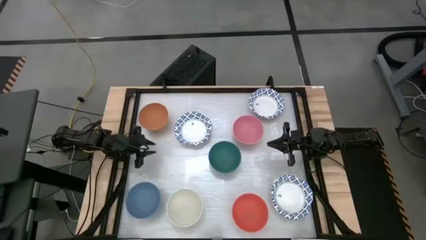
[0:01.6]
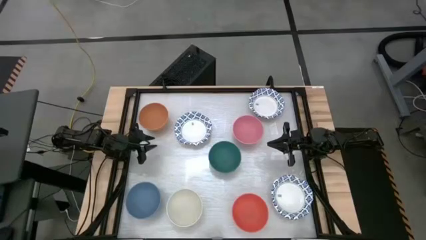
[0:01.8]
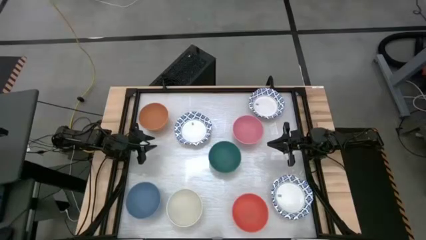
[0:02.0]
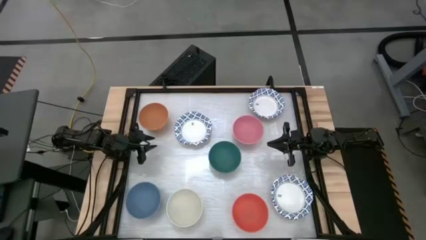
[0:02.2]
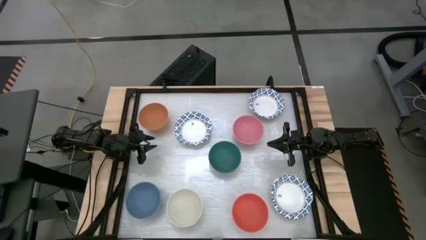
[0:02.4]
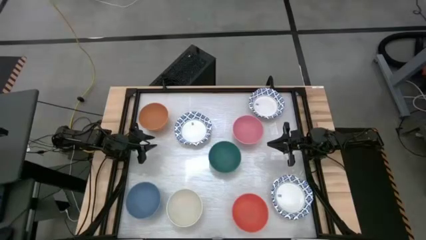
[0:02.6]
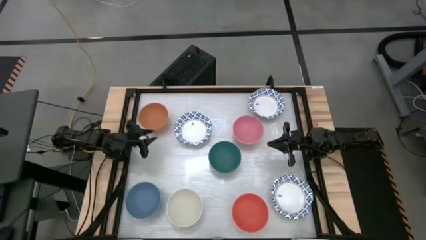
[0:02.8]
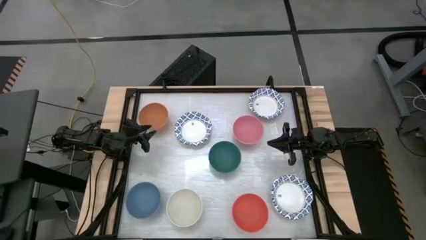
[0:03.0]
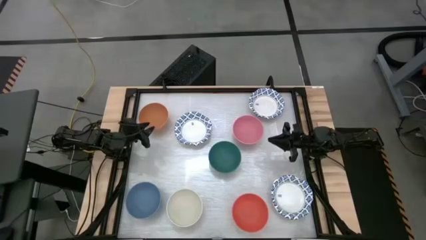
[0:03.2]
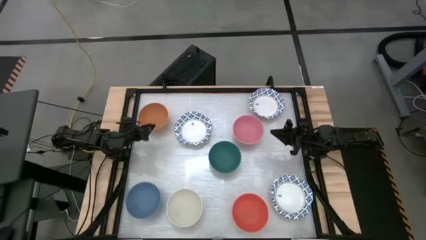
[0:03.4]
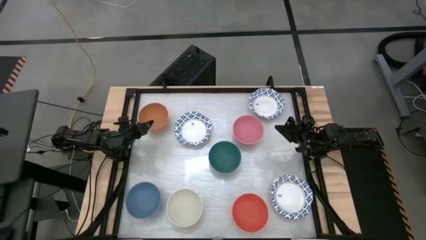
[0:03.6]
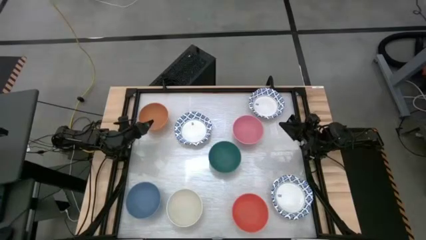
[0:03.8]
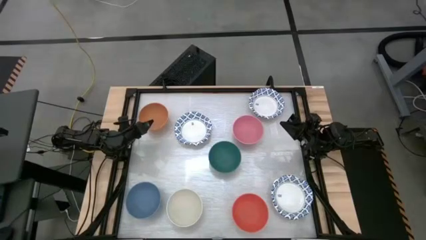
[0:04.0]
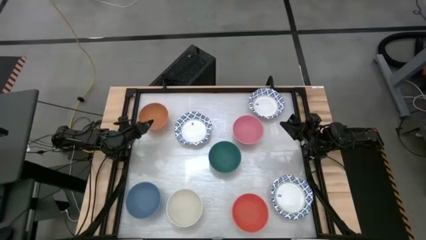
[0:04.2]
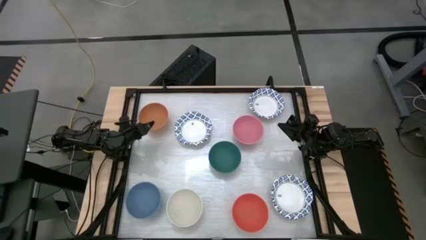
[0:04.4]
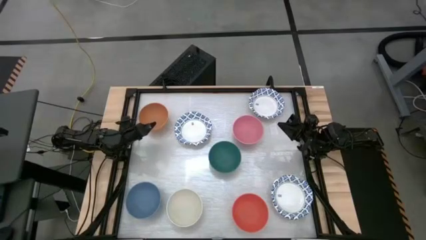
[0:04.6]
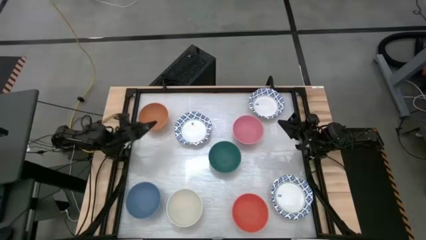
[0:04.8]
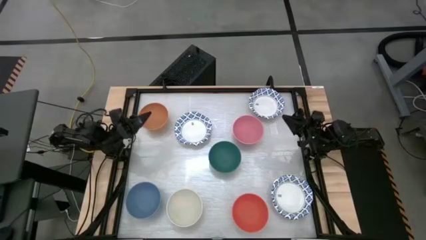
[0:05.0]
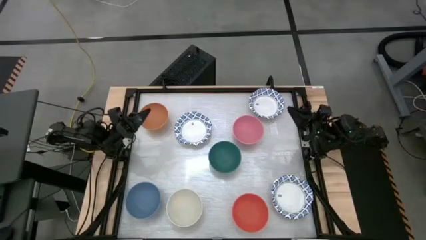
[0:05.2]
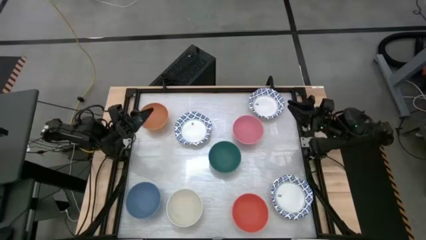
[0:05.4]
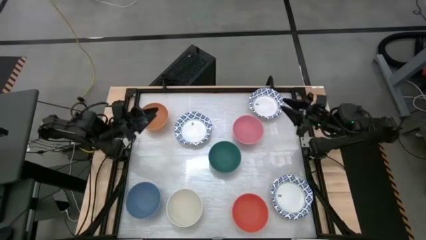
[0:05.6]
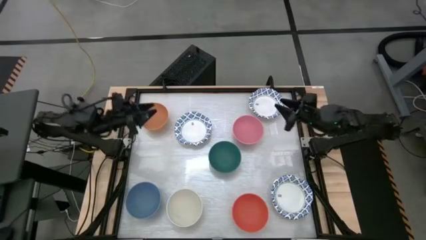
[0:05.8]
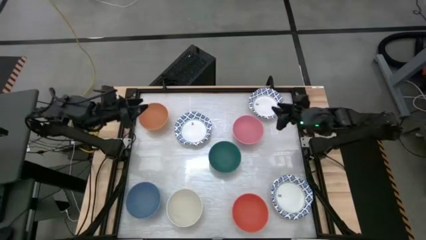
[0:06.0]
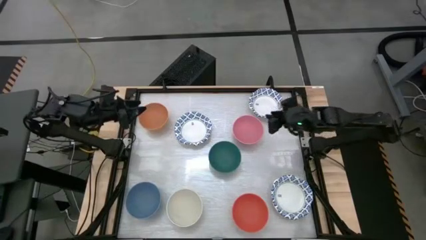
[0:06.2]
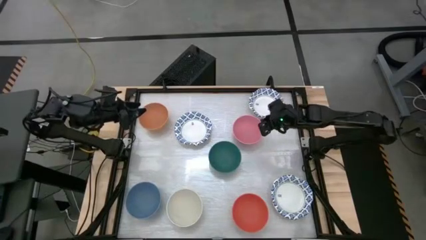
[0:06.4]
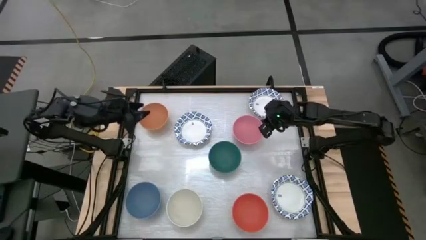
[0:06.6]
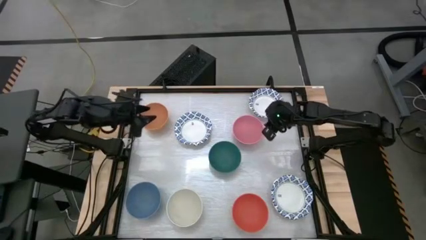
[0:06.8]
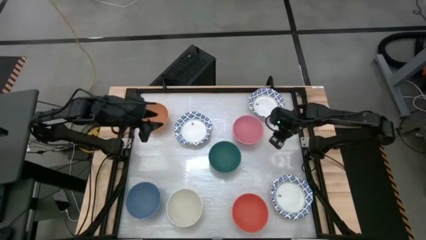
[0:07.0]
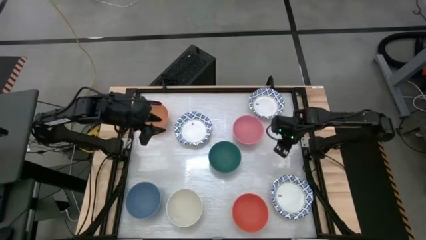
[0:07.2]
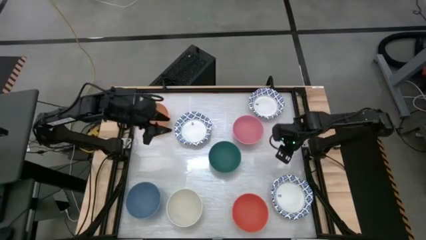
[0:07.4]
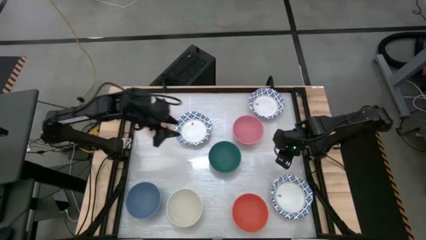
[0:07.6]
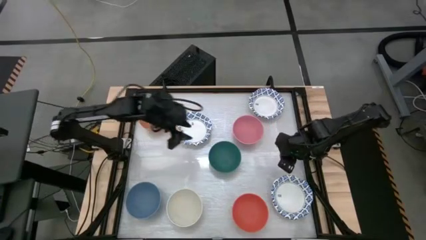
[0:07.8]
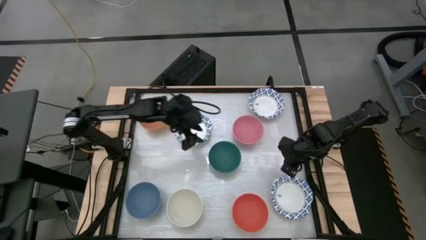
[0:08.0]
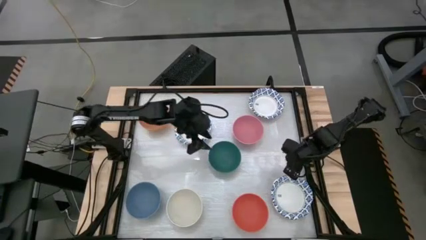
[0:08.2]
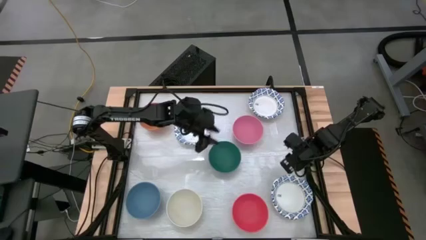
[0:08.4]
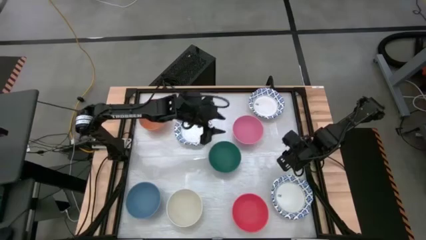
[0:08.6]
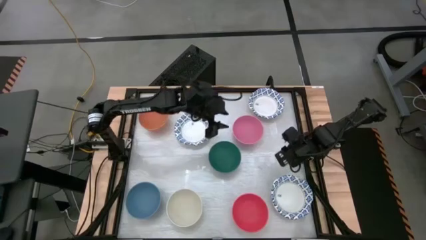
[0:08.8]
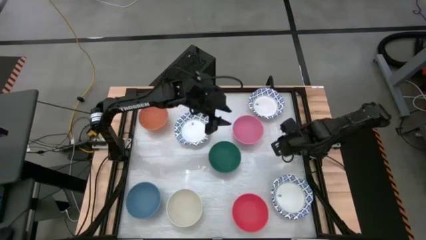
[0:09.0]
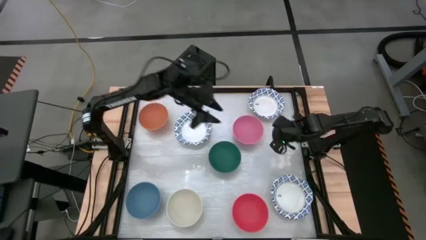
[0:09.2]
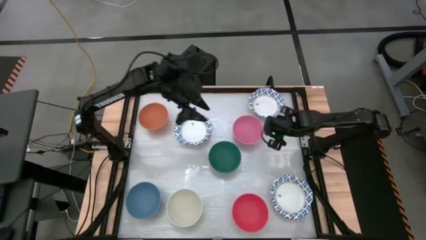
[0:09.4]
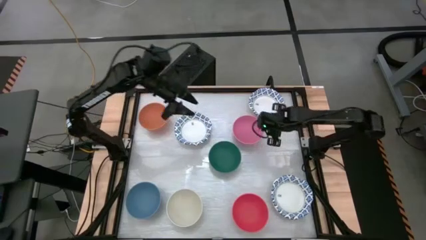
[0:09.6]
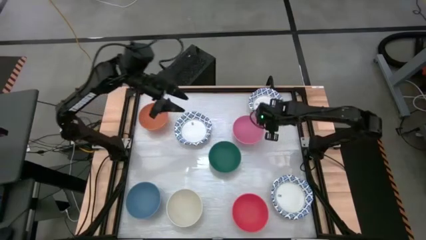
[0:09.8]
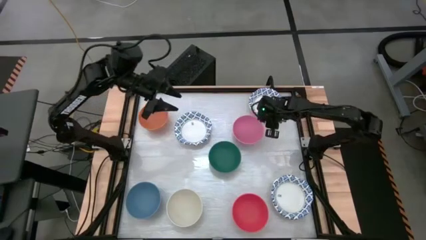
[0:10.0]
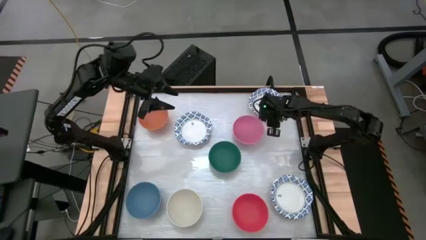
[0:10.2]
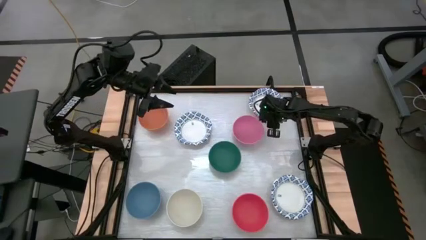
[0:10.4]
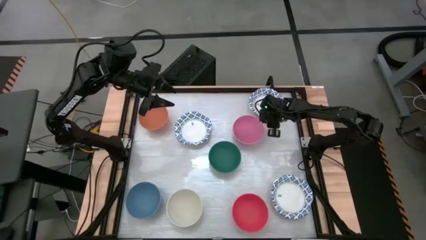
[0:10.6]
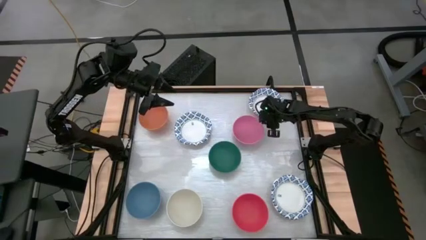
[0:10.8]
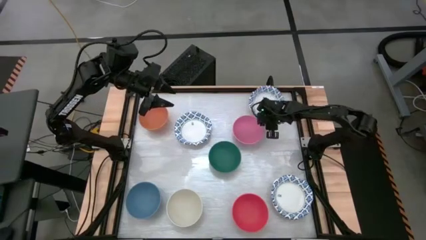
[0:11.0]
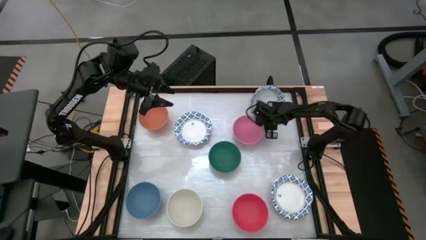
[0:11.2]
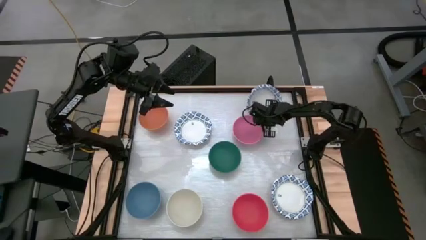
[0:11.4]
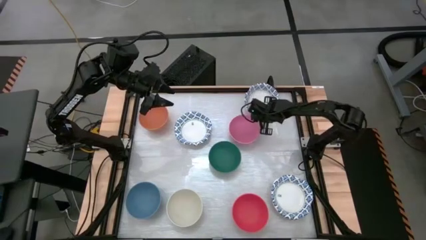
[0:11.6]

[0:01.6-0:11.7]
Stack the top white patterned bowl on top of the middle white patterned bowl

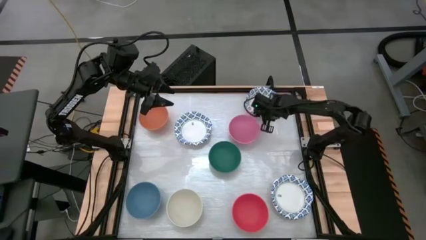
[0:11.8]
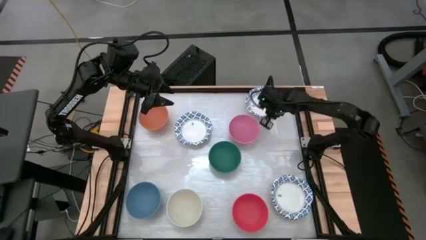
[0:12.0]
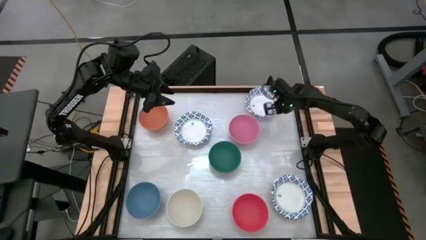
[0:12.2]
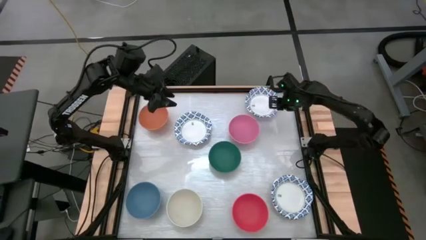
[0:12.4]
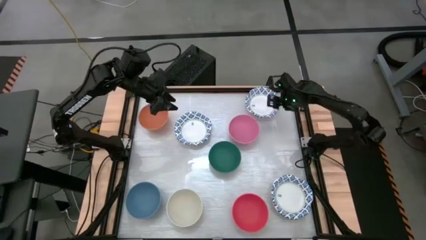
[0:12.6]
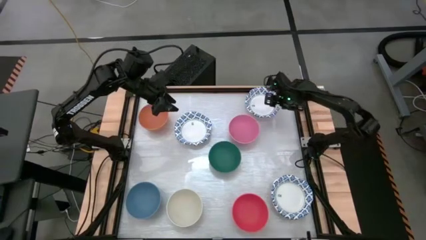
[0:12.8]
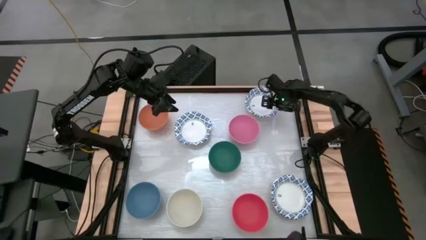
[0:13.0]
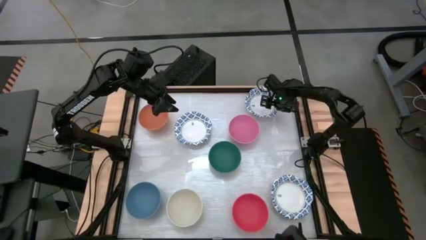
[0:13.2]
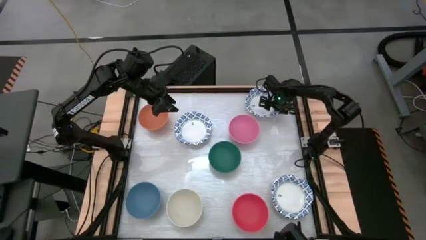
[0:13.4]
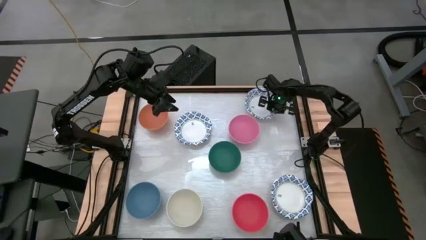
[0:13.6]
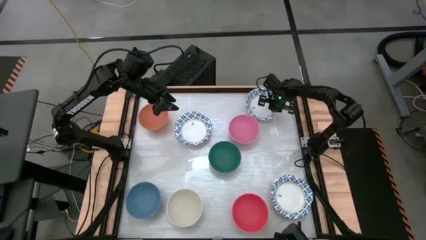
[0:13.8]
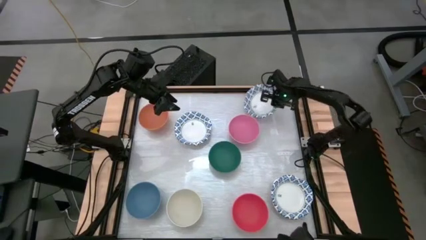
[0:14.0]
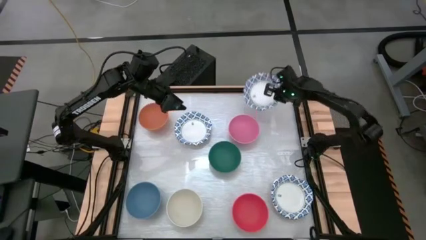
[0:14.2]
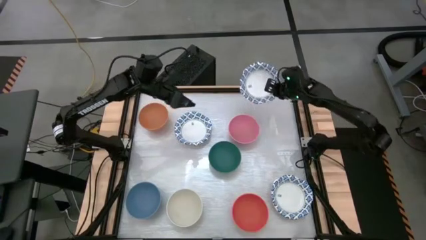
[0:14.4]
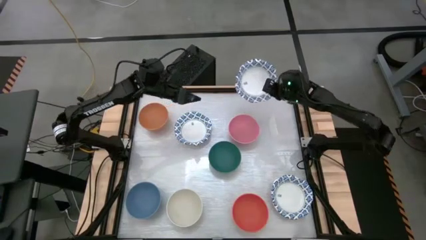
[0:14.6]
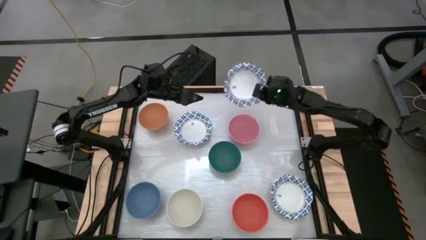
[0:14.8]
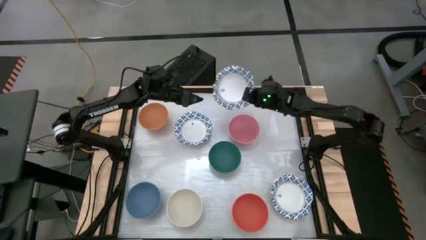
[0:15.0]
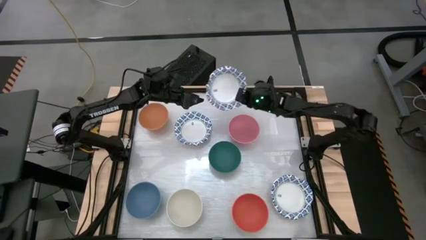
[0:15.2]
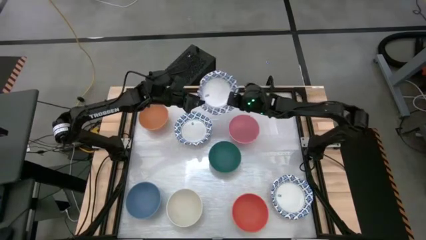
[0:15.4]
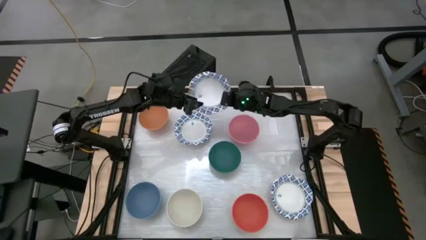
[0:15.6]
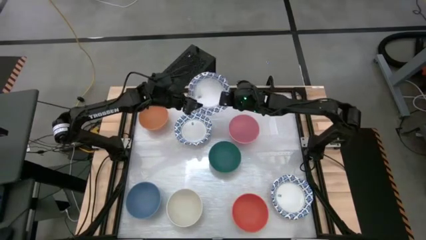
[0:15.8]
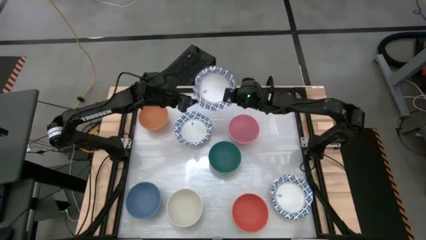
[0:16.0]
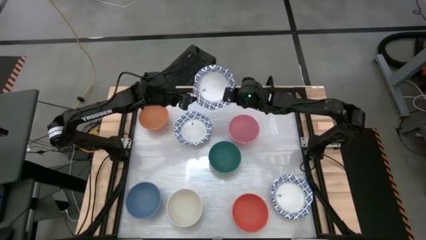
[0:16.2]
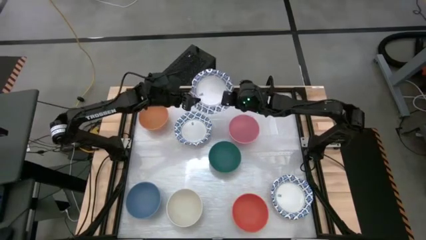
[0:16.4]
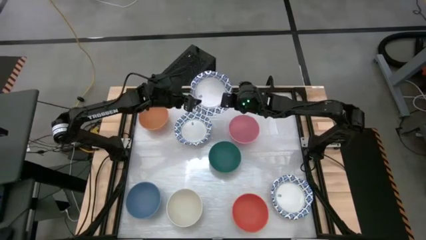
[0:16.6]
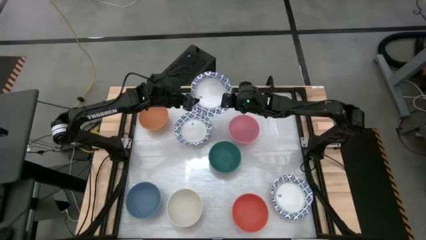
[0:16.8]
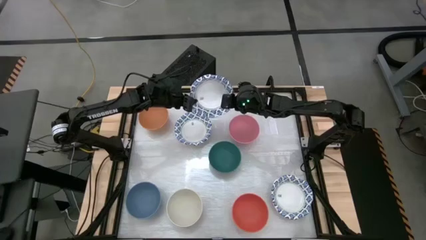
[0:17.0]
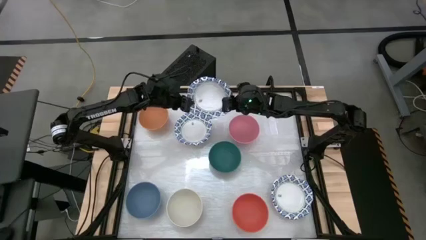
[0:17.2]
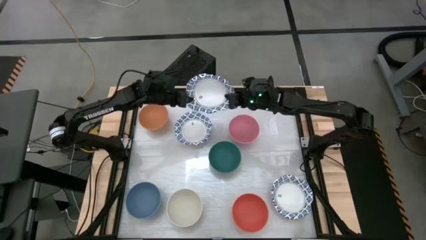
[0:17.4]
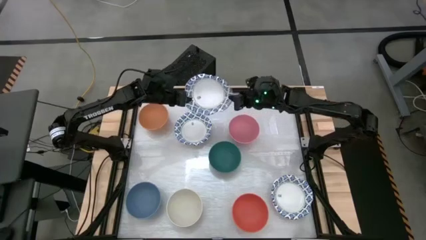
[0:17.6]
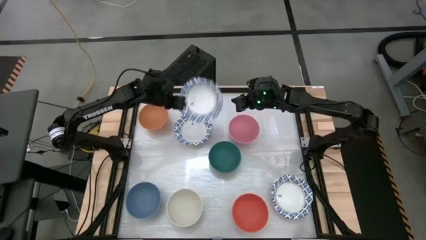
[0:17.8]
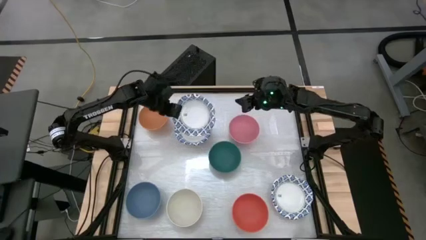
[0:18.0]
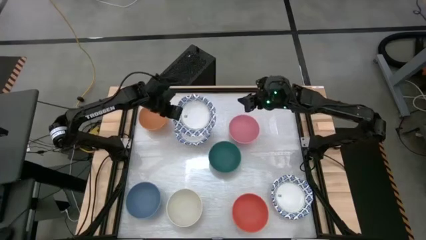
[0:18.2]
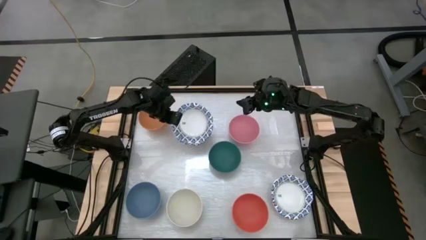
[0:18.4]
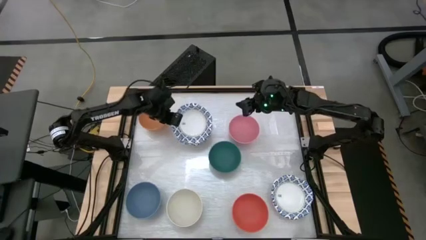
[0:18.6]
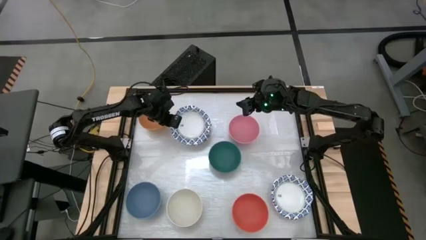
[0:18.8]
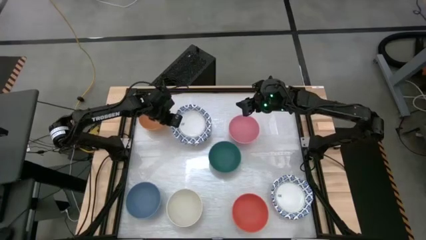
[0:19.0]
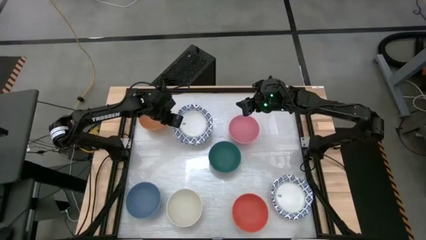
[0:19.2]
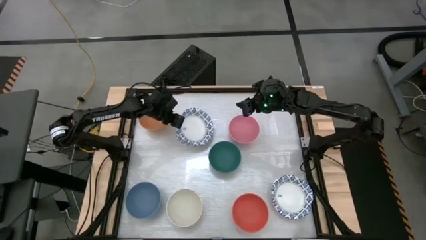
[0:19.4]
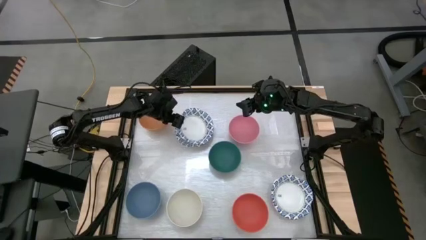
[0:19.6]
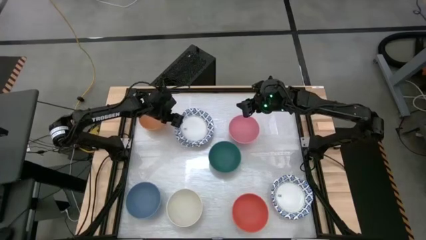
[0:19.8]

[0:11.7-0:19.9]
Stack the top white patterned bowl on top of the middle white patterned bowl
